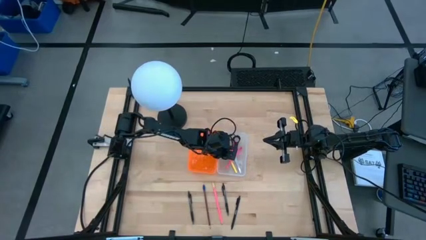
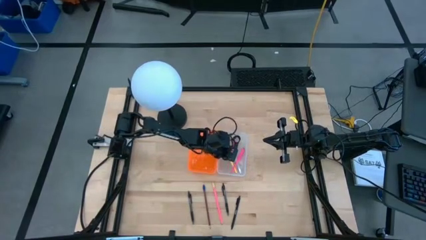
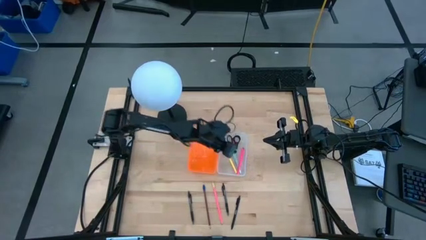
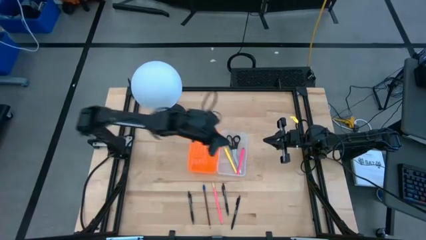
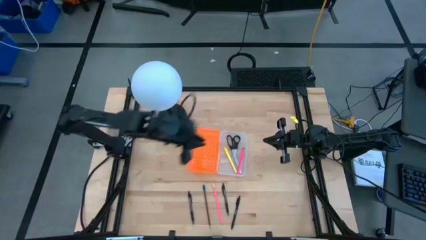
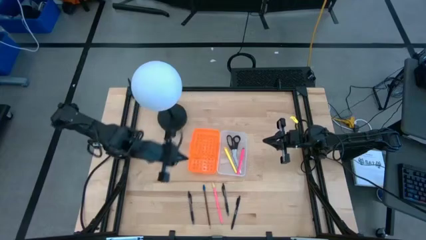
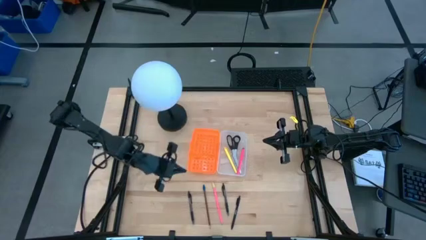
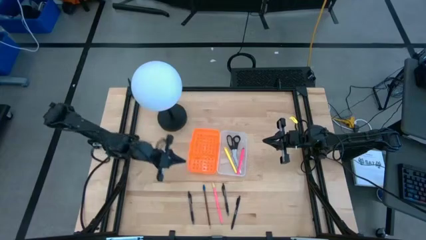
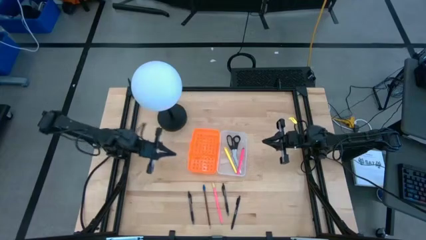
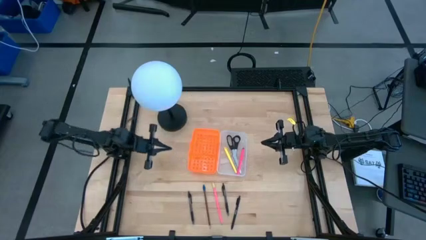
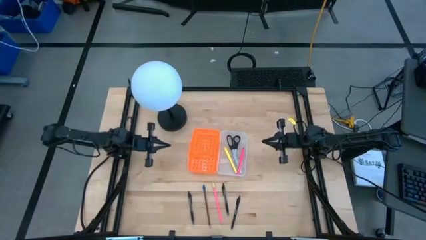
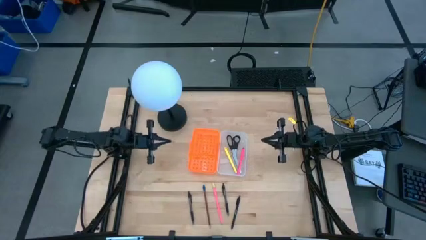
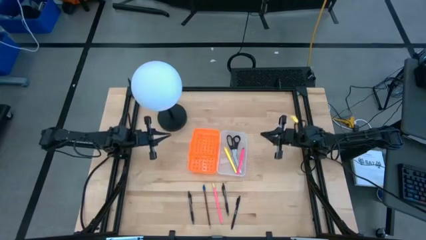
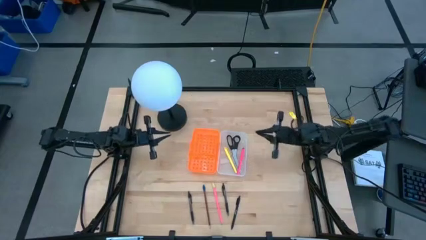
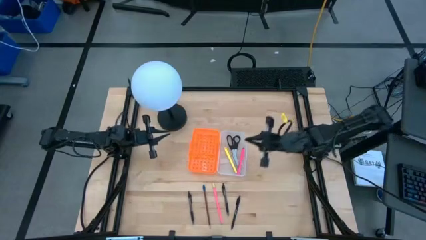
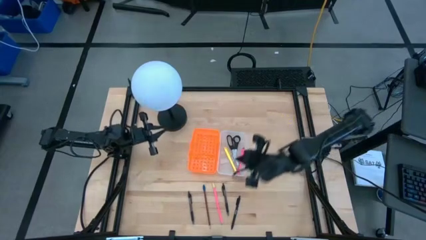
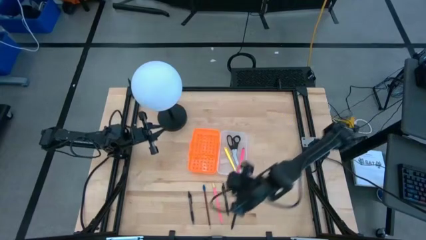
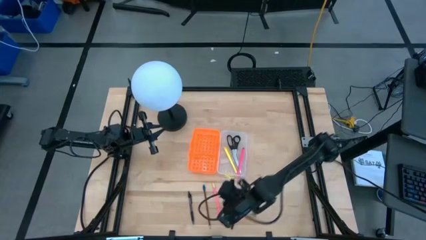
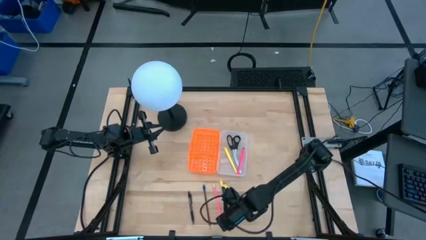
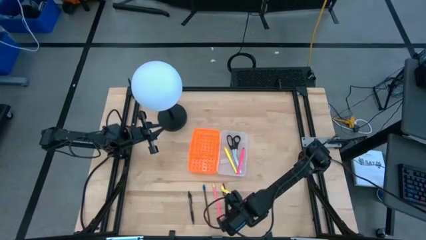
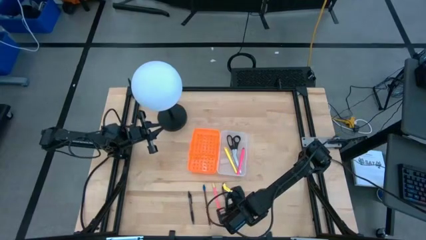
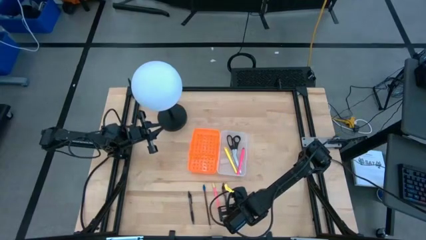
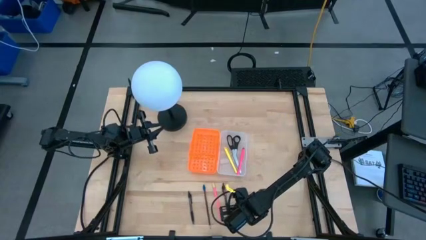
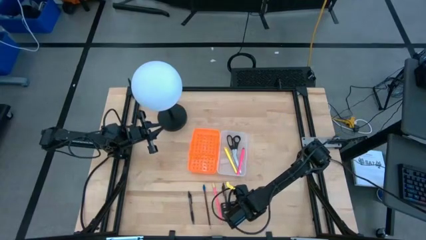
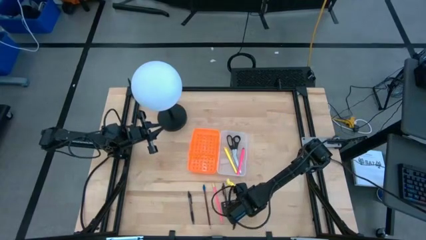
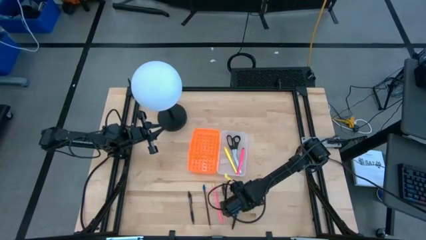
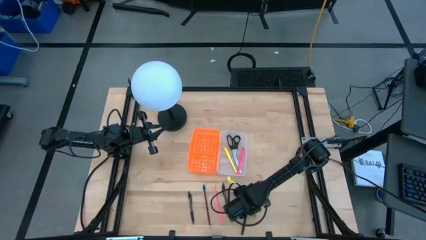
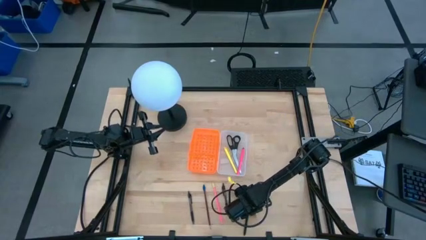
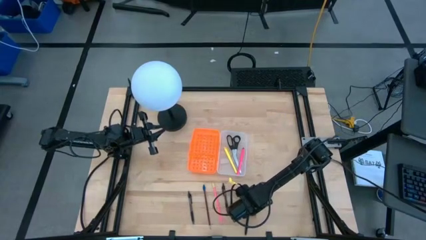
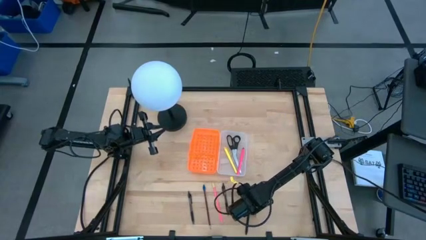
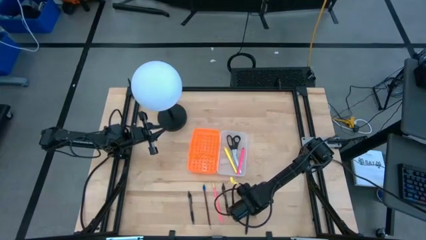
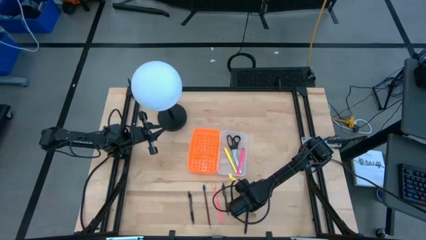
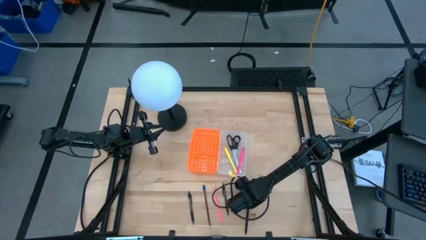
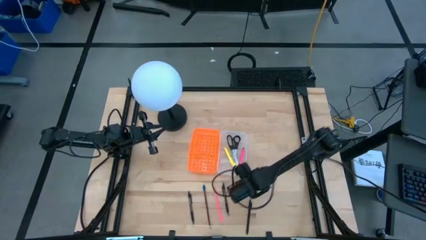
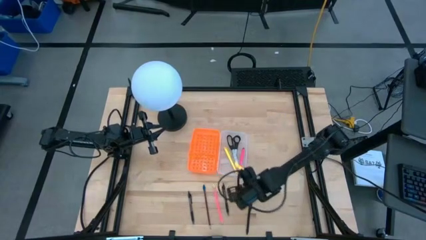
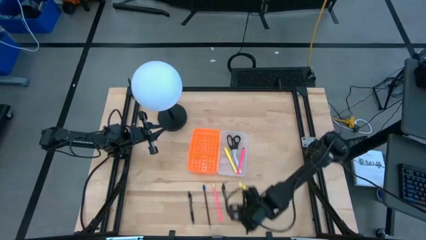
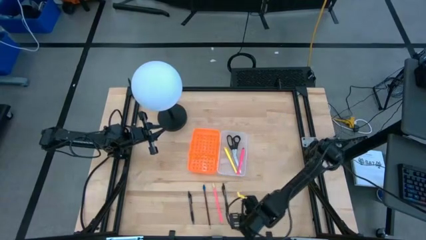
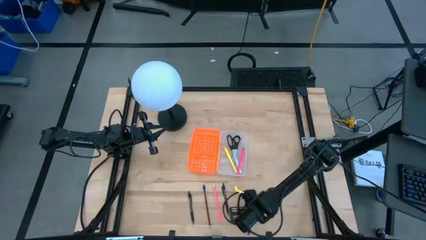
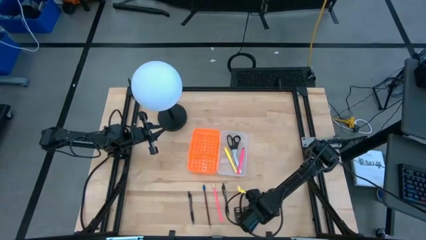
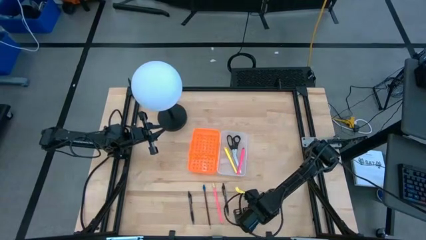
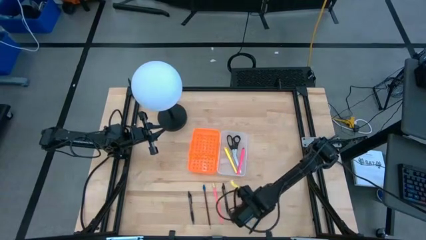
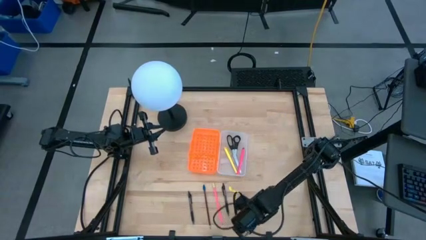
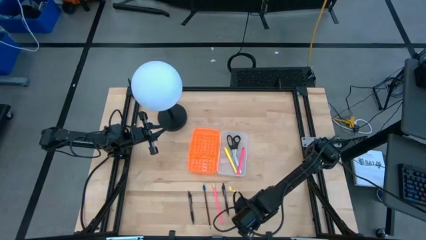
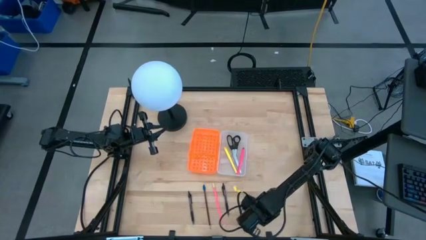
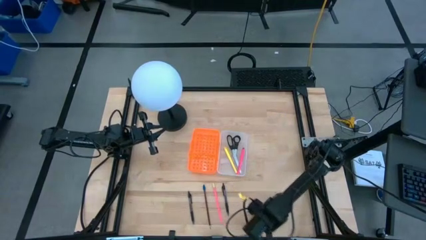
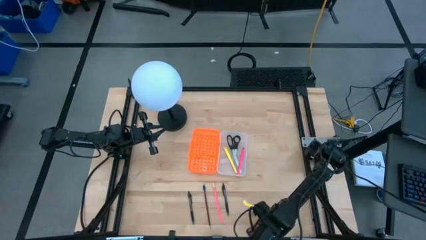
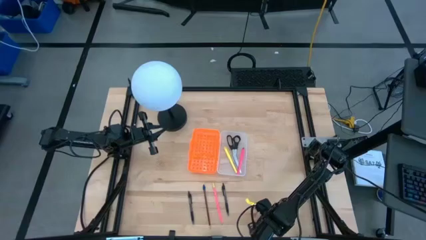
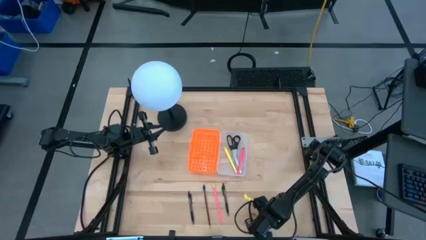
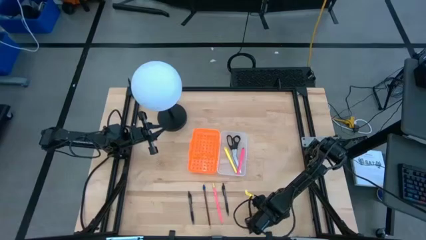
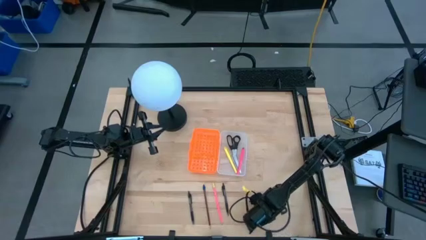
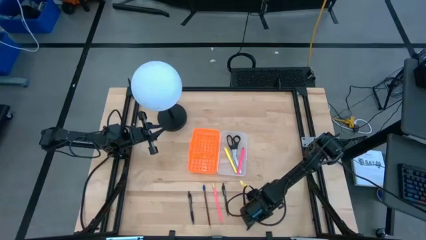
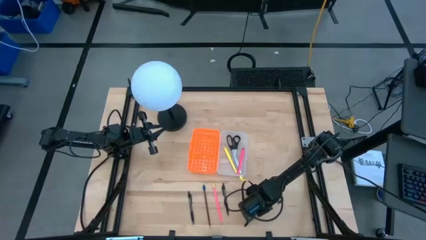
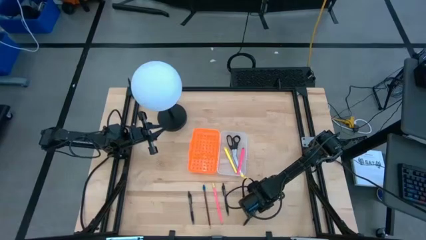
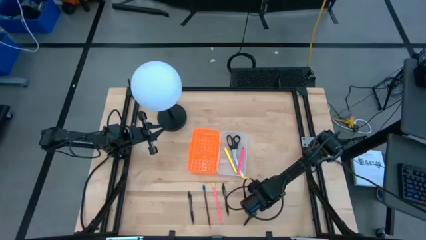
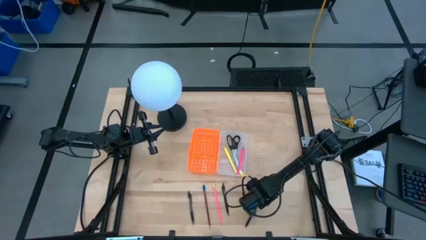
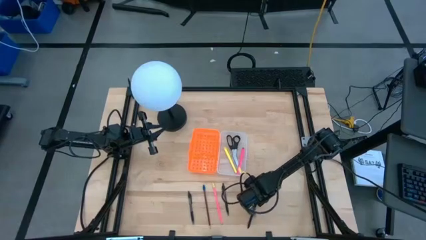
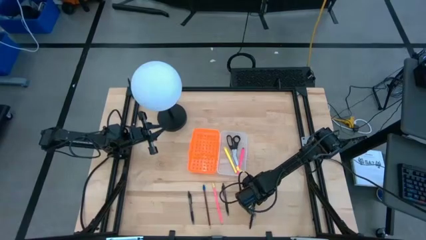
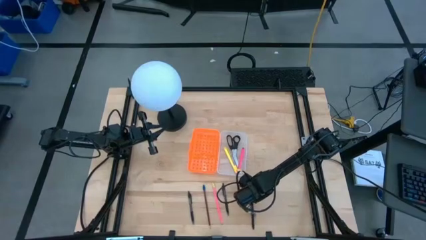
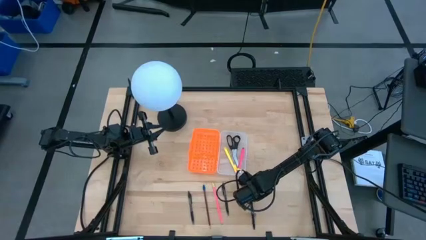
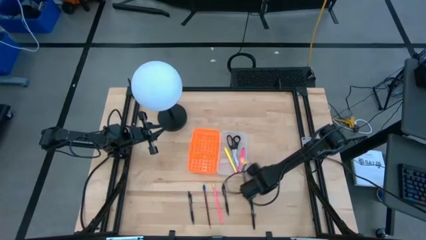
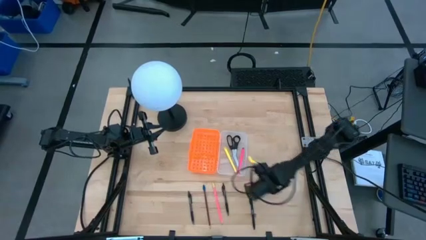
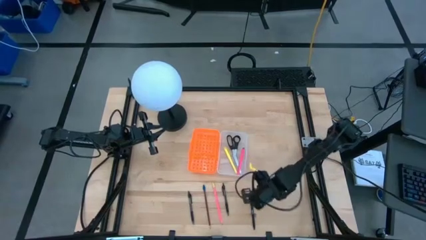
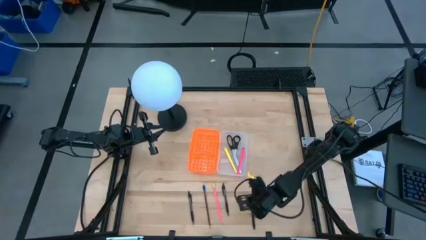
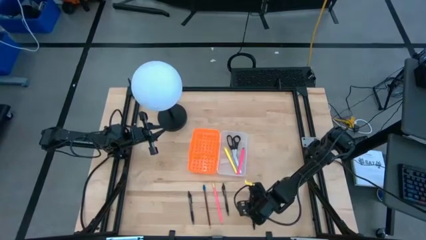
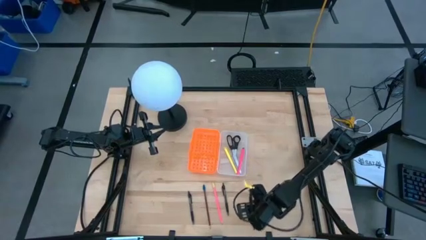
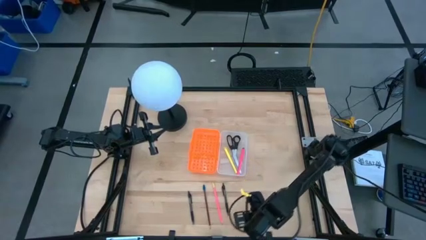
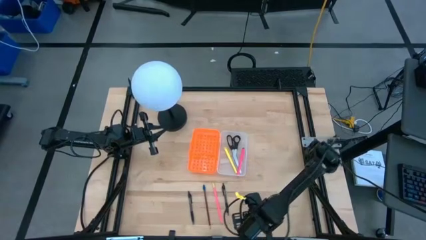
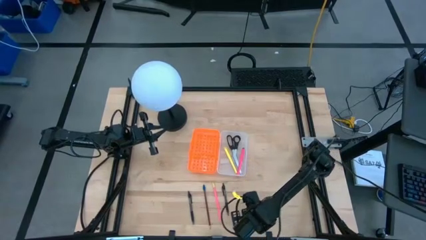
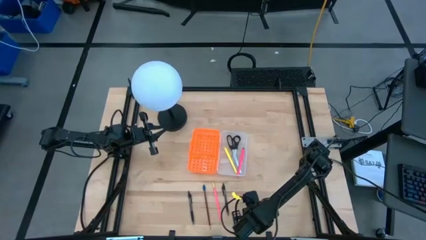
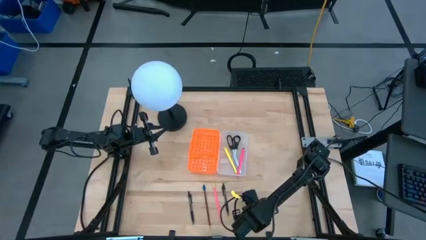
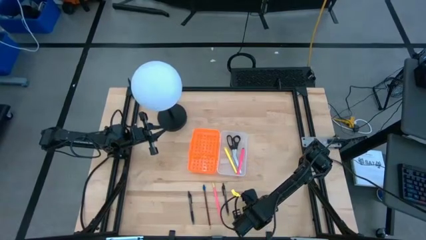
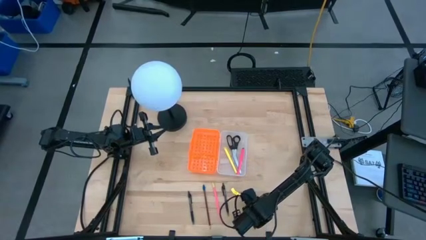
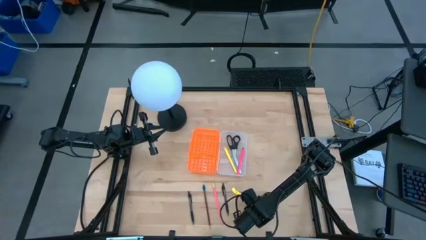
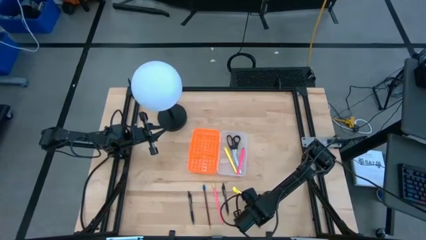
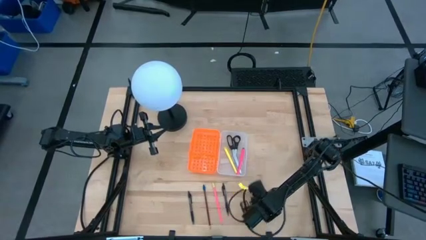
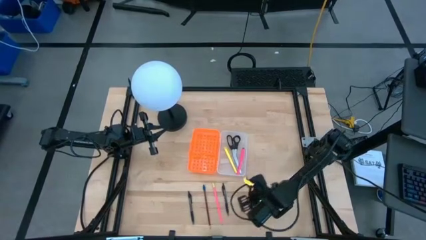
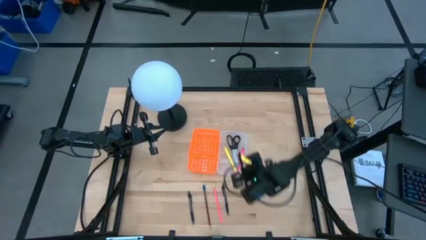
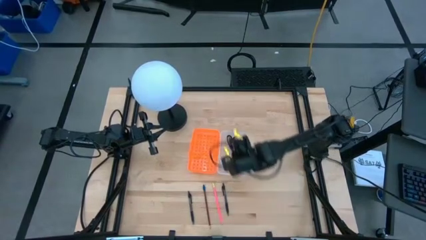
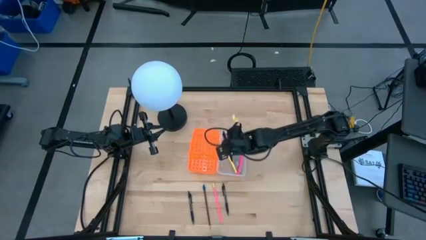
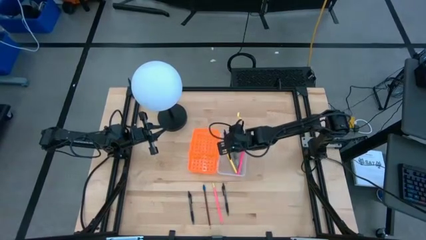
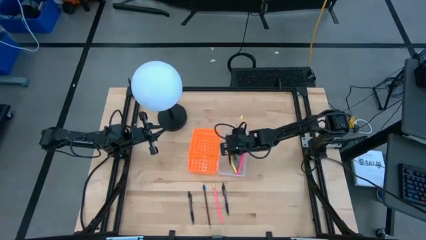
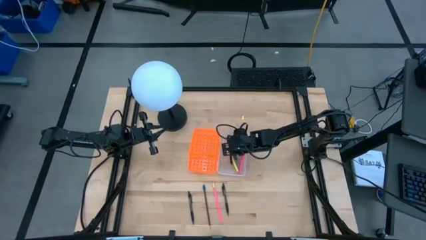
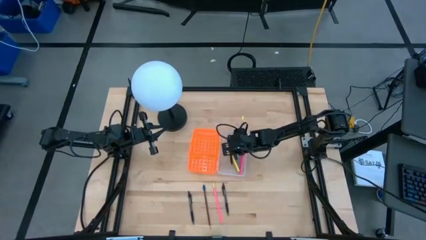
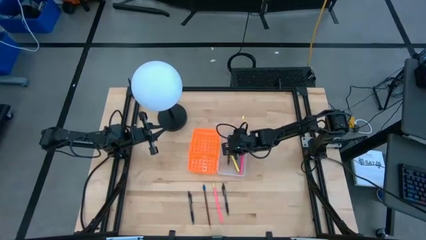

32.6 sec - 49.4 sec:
Task: Pick & place school supplies into a supply box
Put the right black pen into the orange supply box
